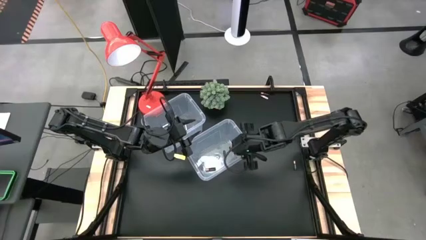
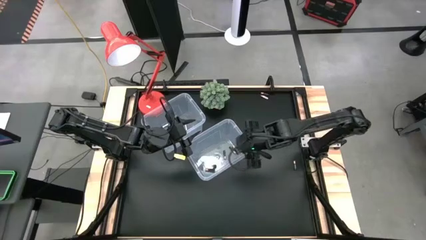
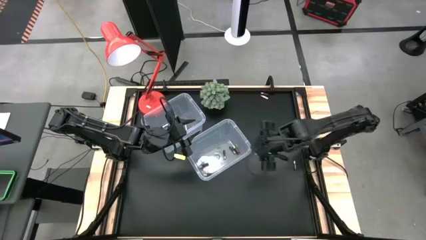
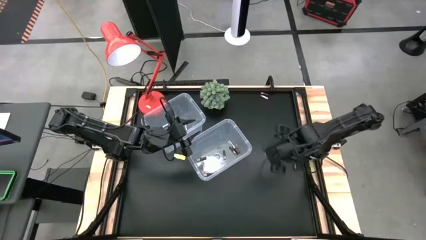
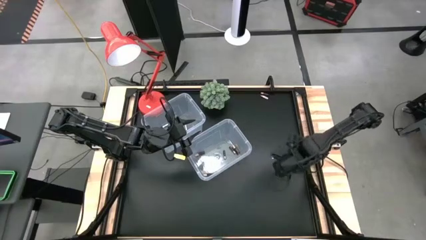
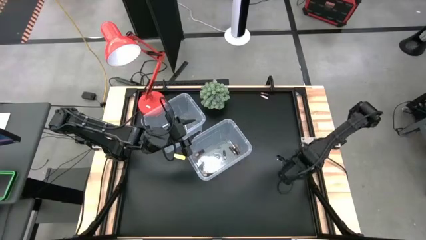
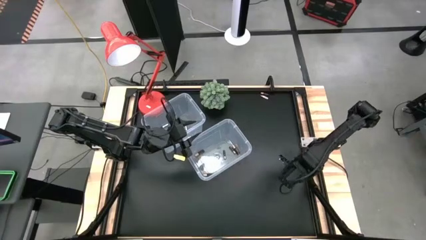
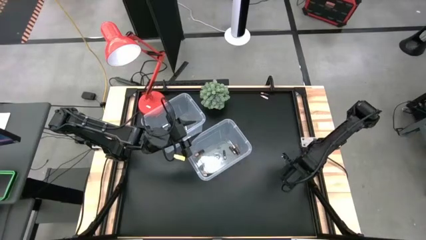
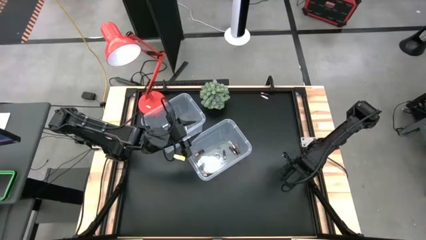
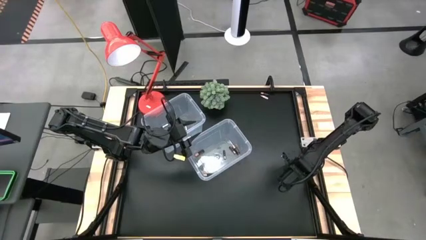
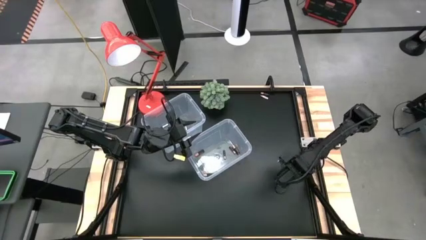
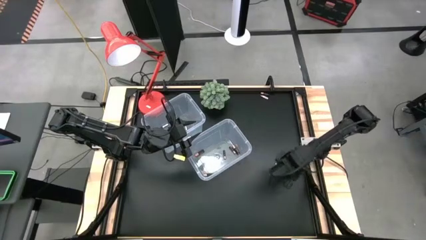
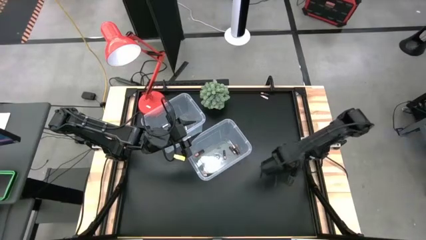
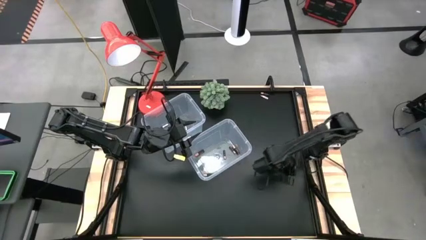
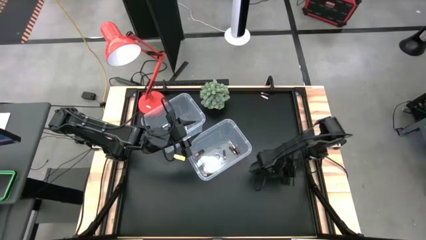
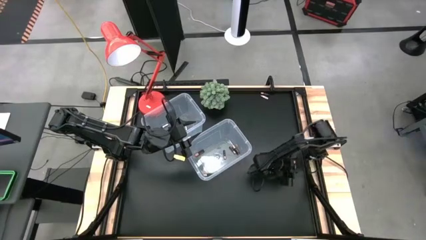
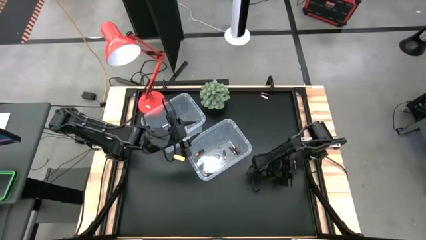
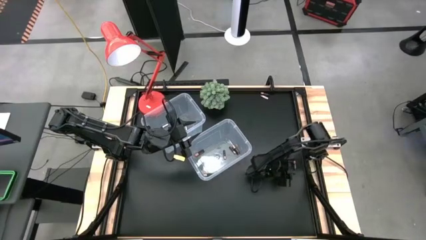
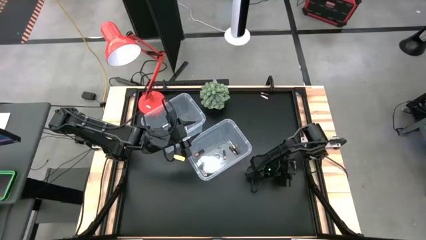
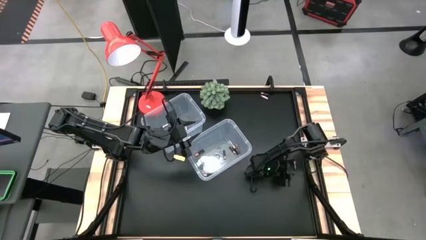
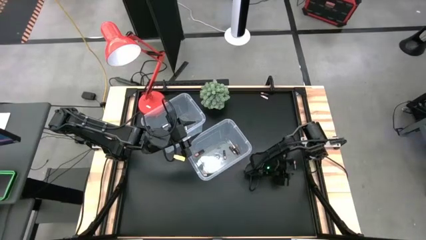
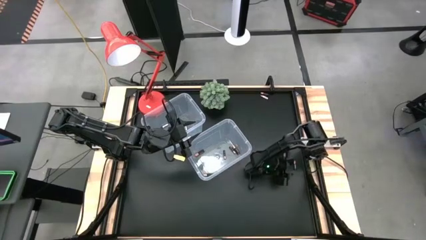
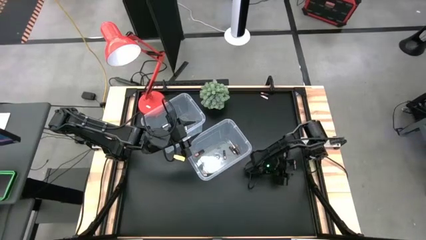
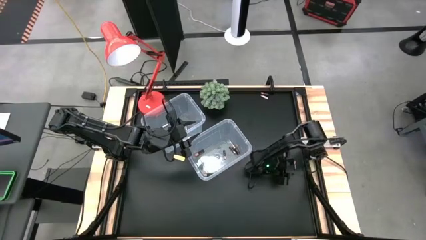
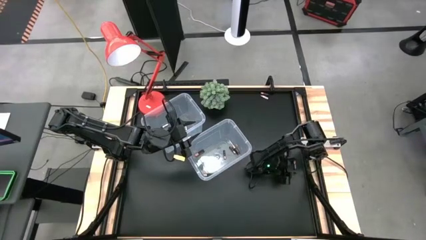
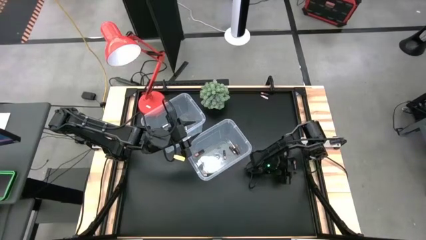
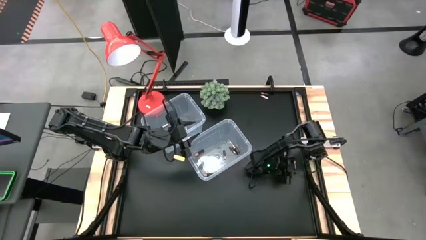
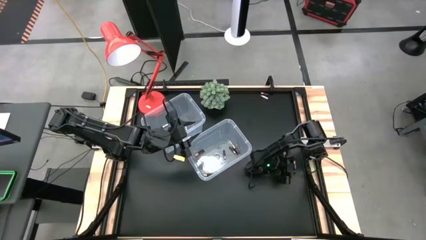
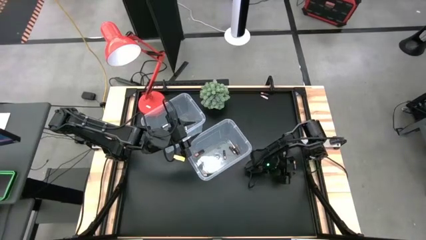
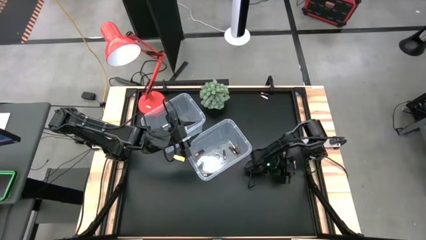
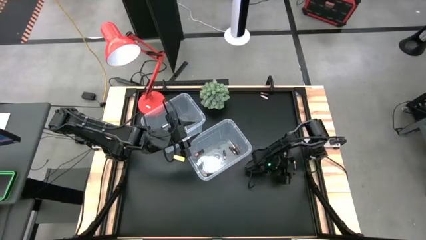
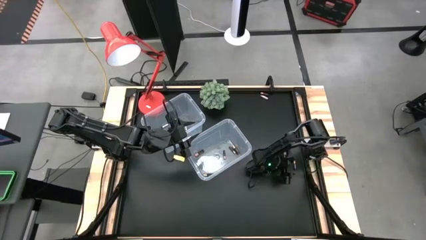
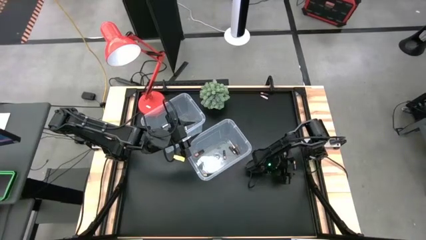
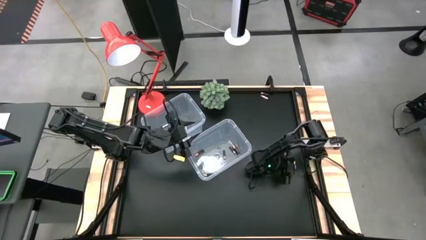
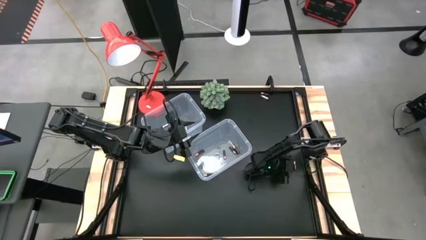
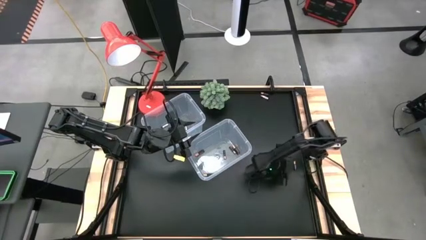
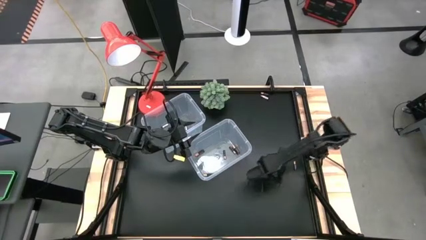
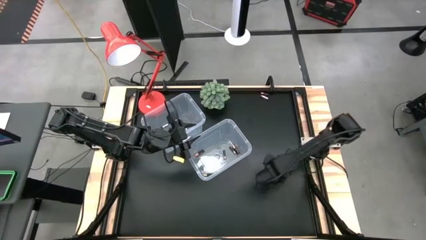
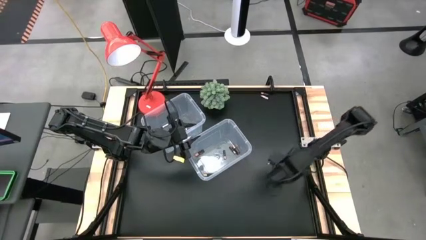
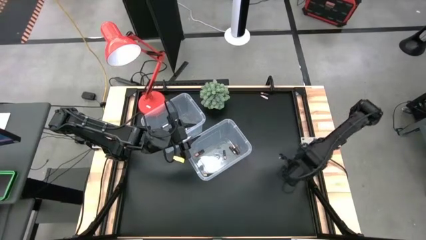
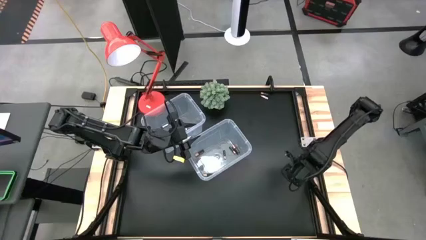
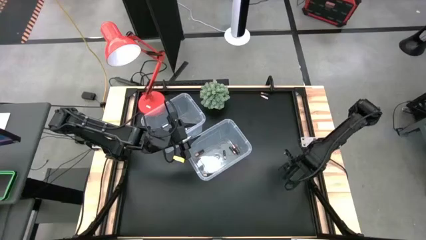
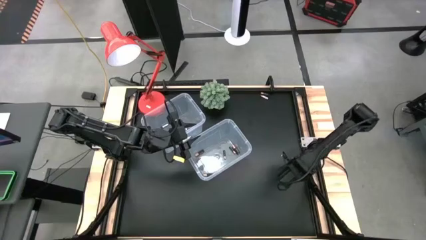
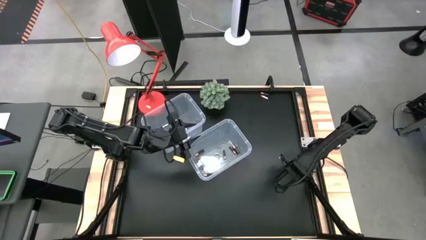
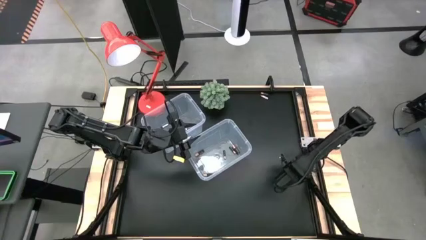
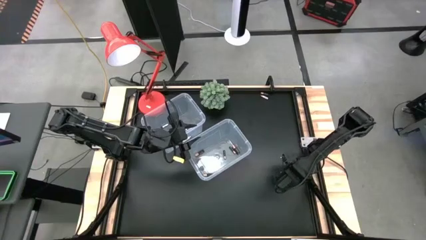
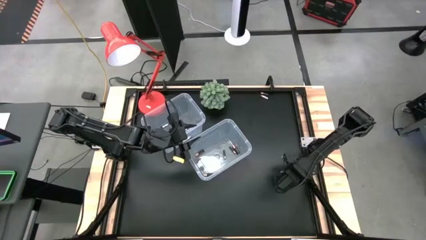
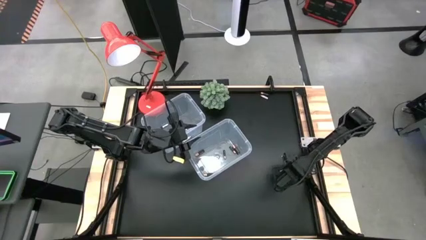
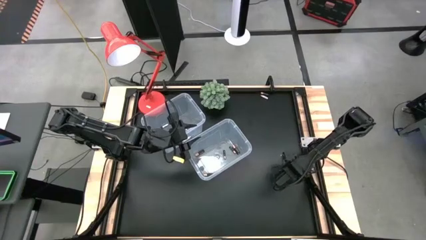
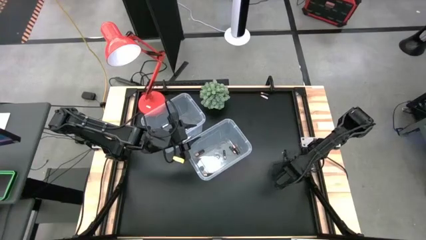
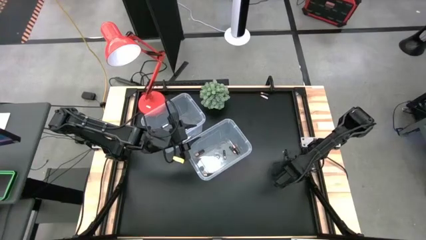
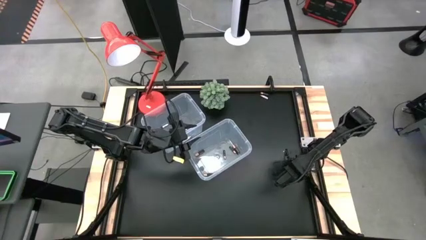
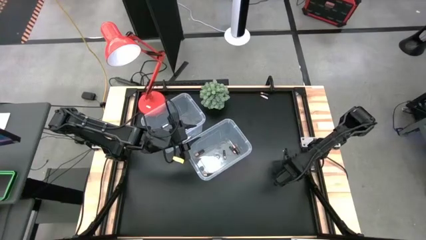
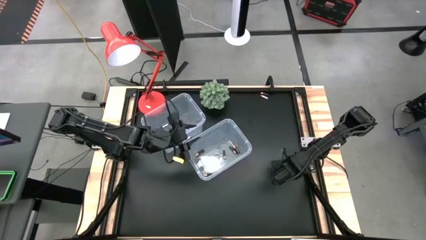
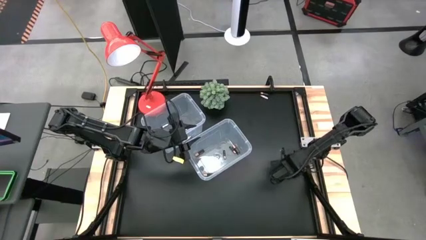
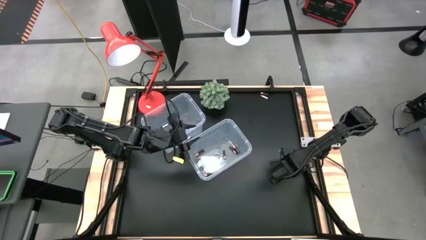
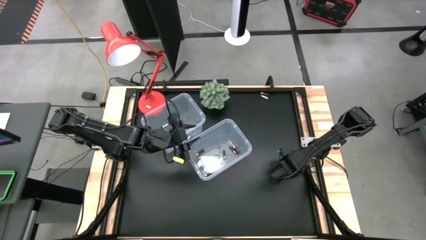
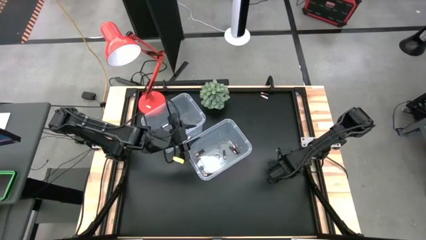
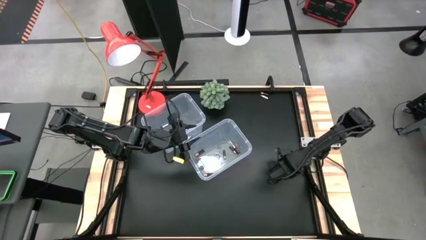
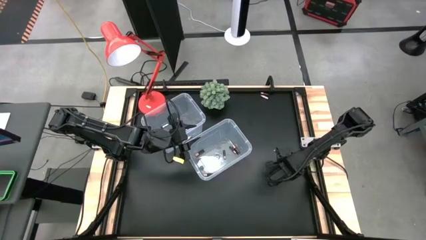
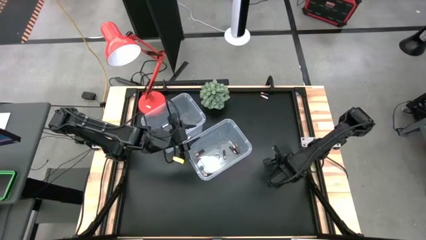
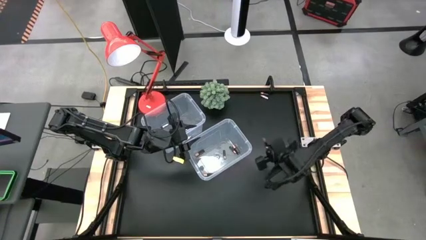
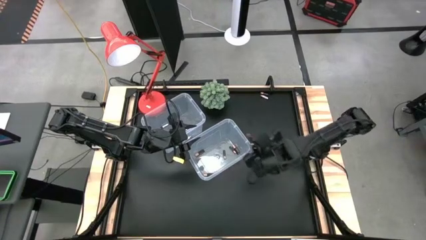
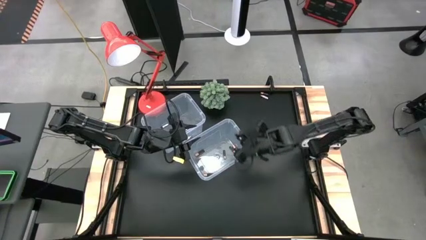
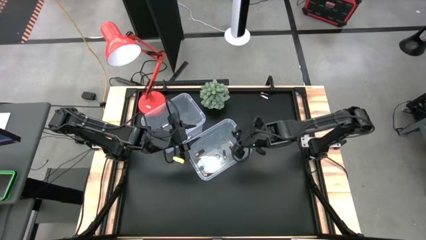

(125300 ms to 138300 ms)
Task: Sort batteries
Put the brown battery into the bottom transparent bin

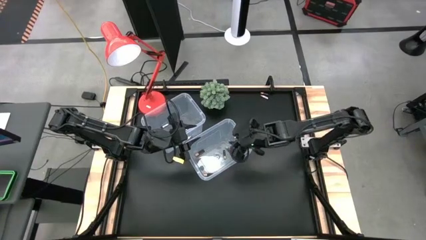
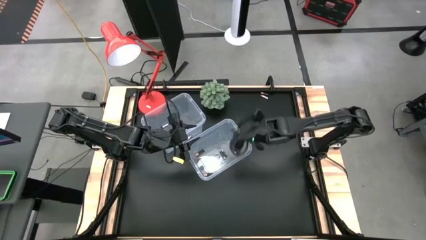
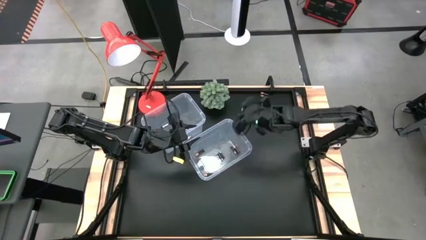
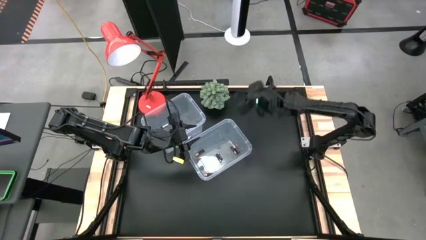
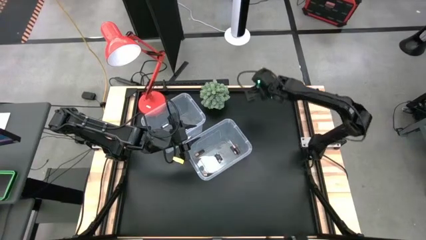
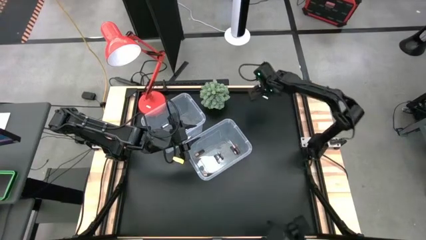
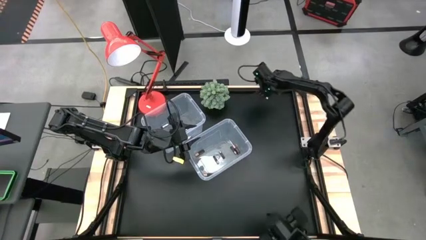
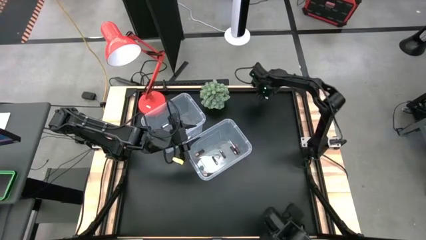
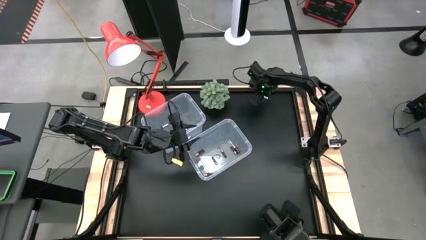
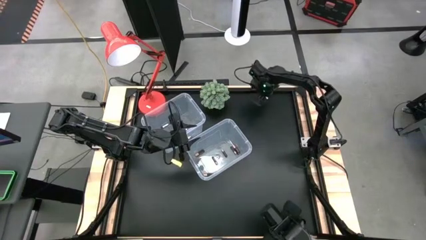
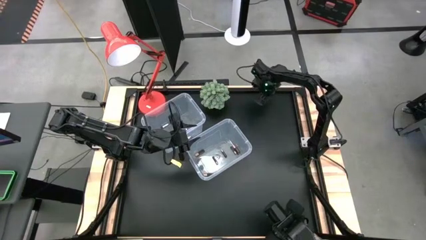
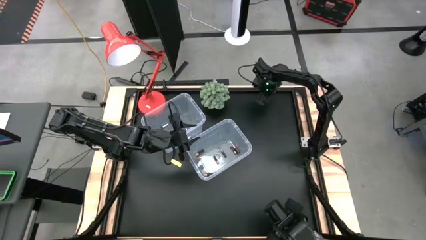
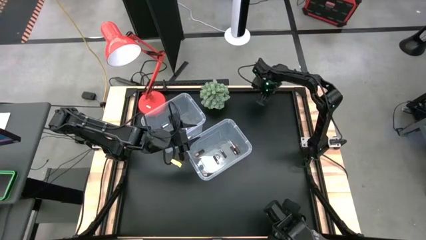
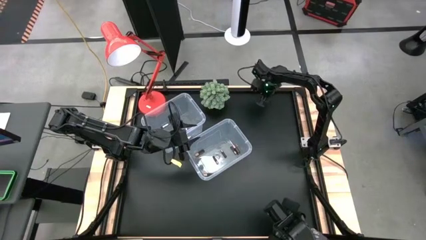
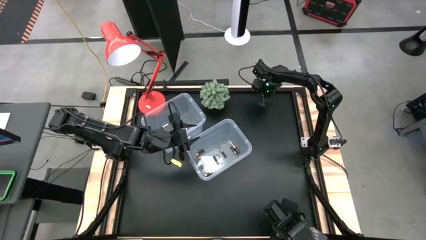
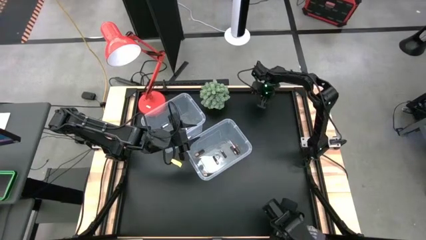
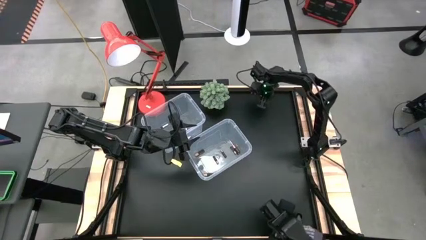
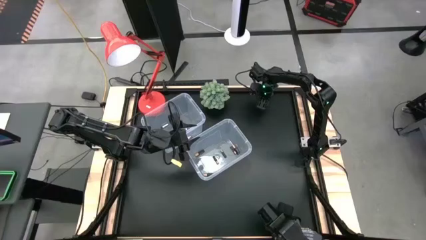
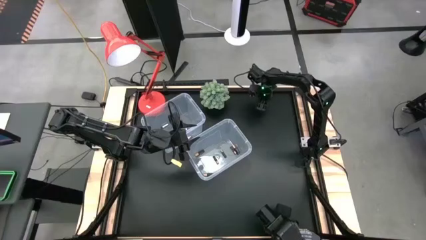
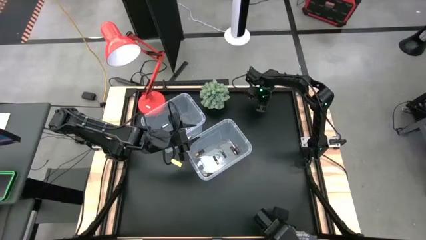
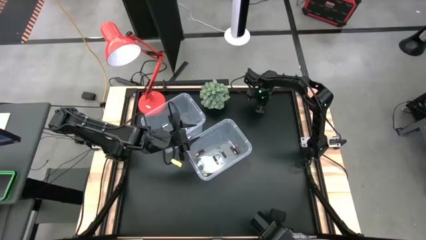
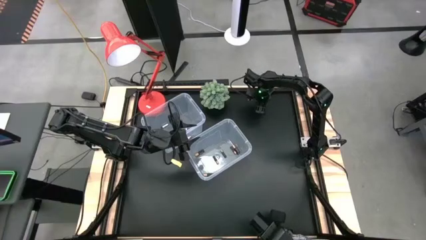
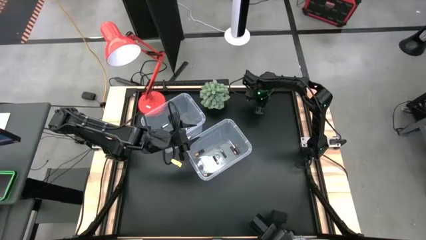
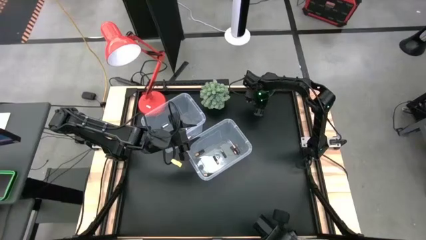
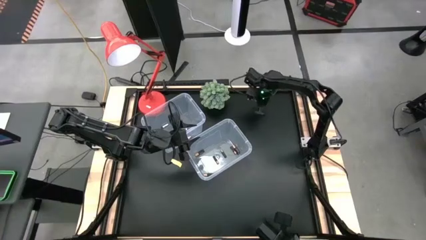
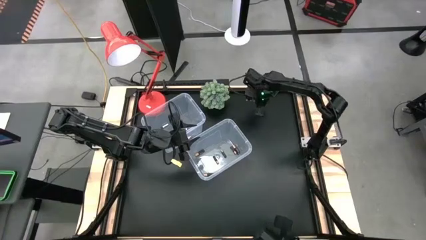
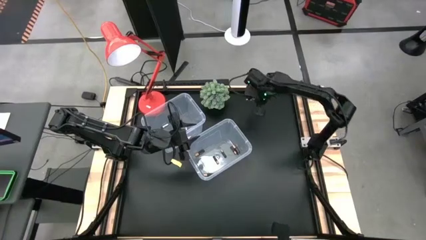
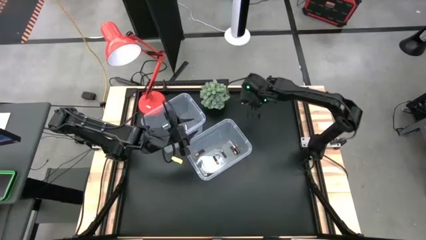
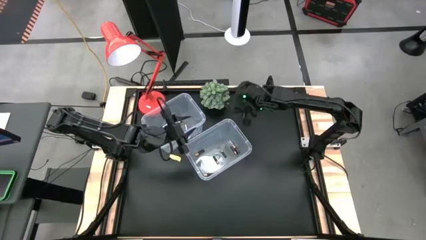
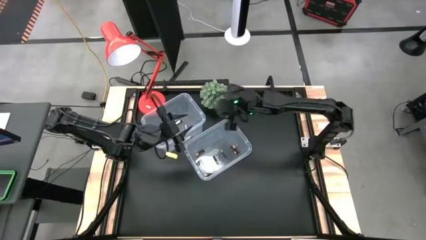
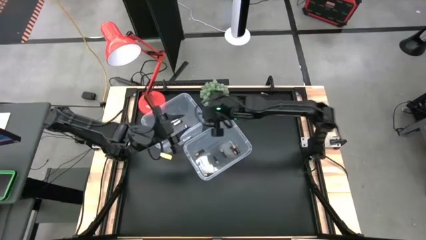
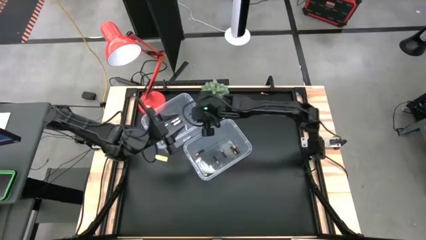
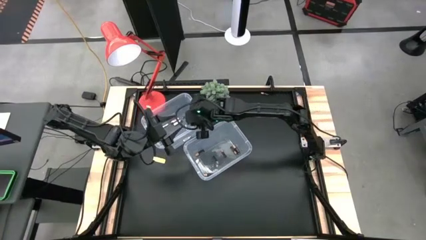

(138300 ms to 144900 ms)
Put the silver battery into the top transparent bin
